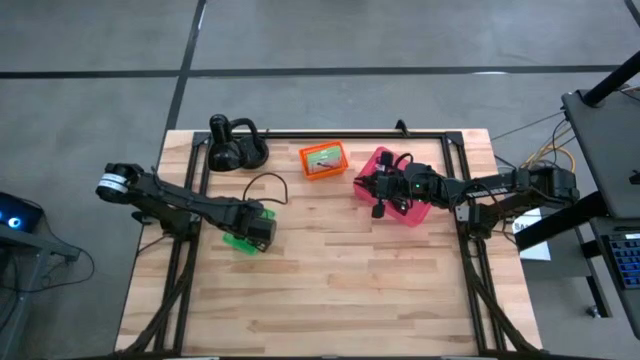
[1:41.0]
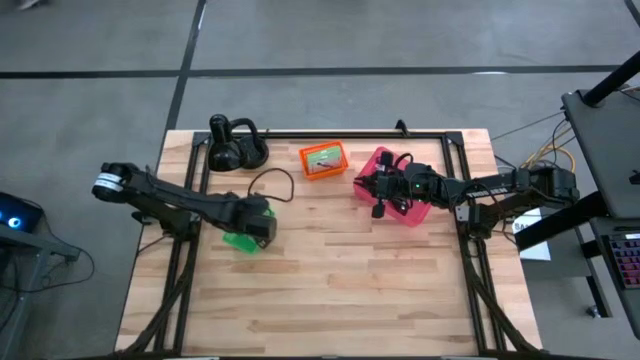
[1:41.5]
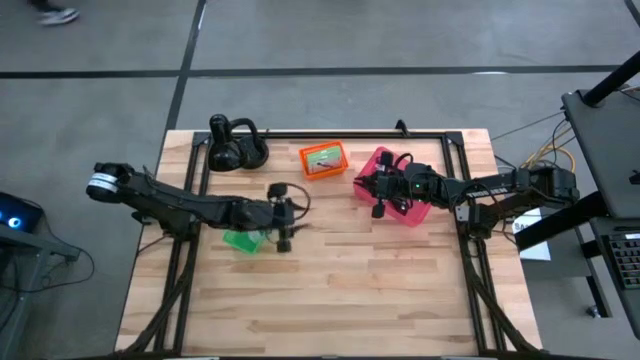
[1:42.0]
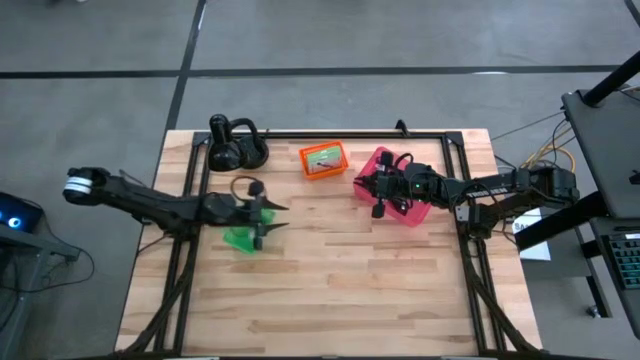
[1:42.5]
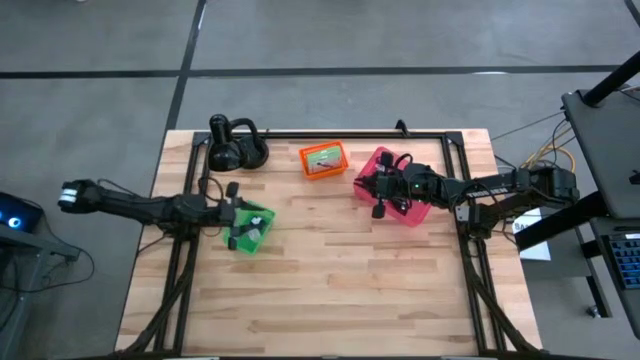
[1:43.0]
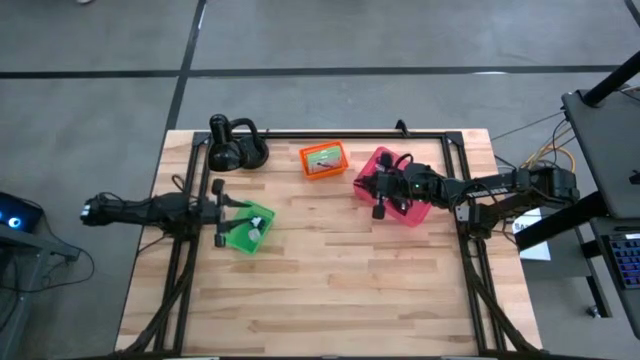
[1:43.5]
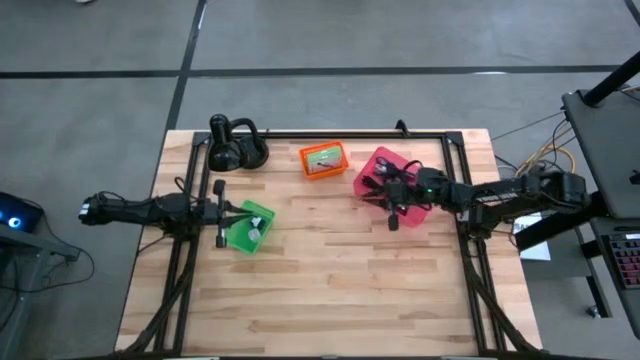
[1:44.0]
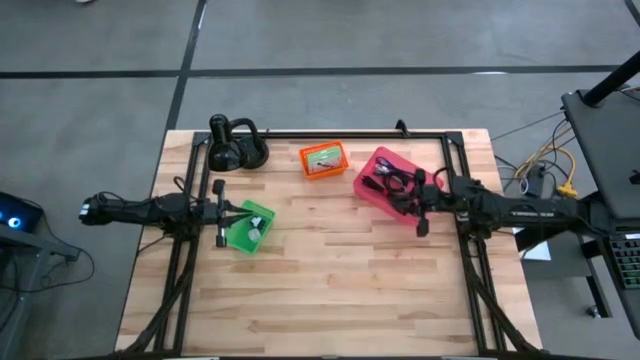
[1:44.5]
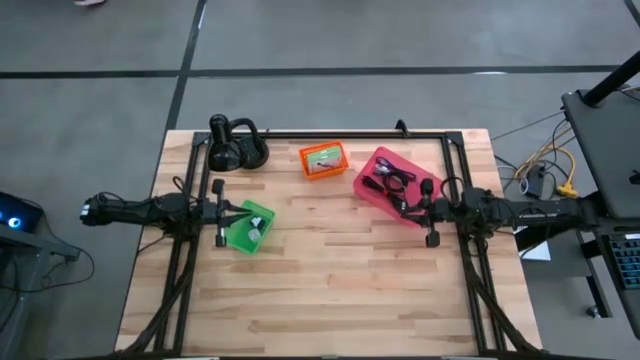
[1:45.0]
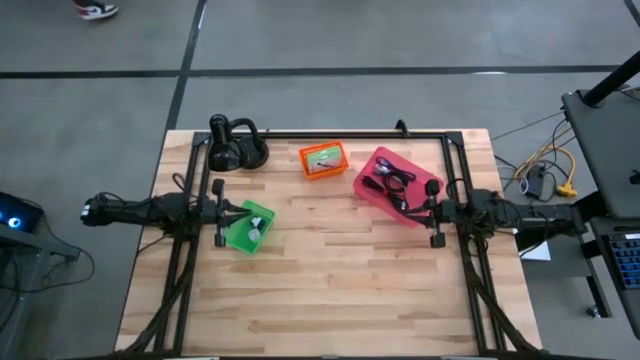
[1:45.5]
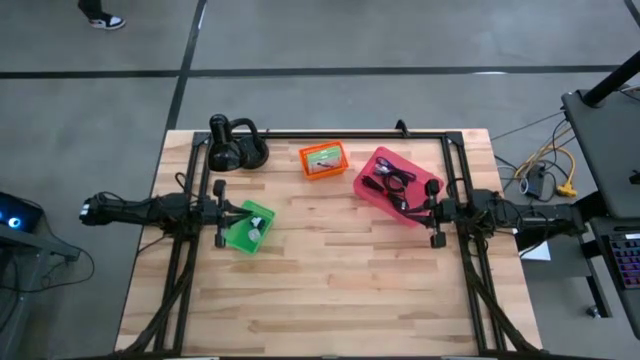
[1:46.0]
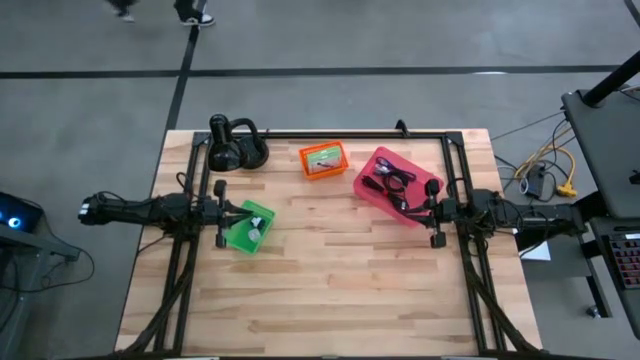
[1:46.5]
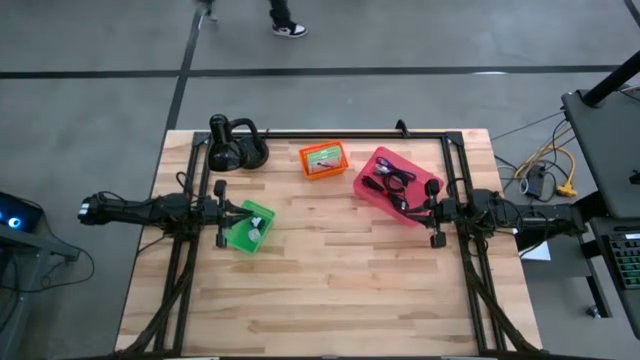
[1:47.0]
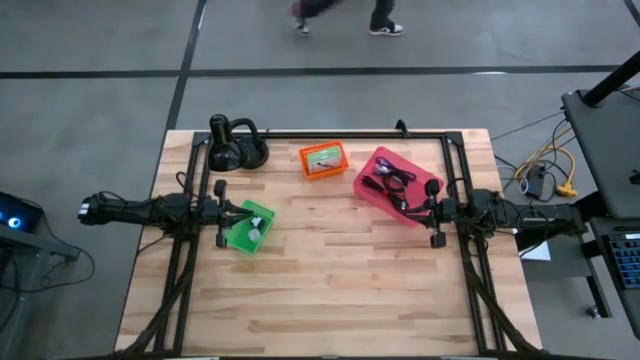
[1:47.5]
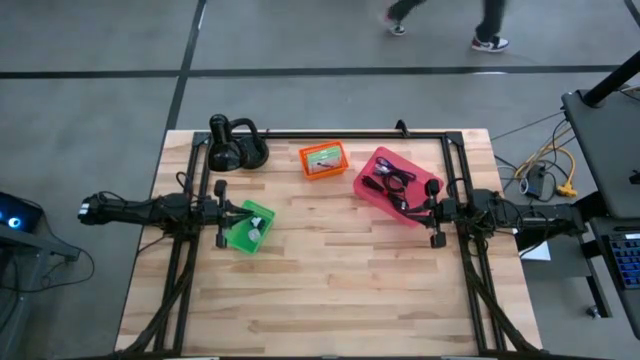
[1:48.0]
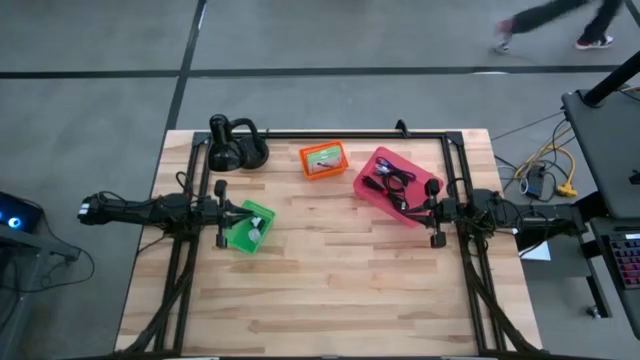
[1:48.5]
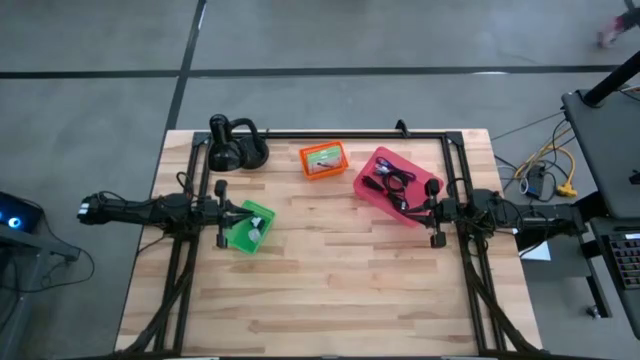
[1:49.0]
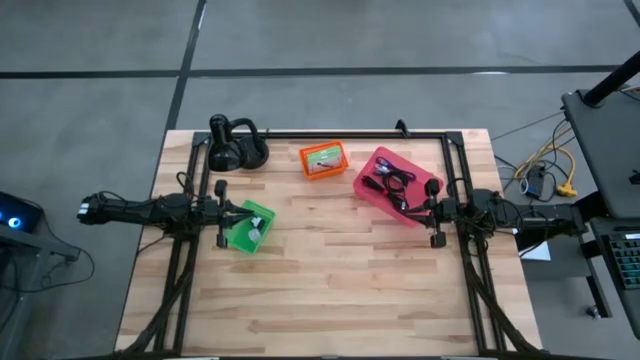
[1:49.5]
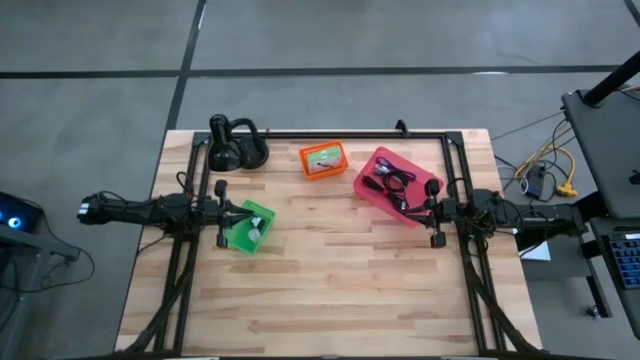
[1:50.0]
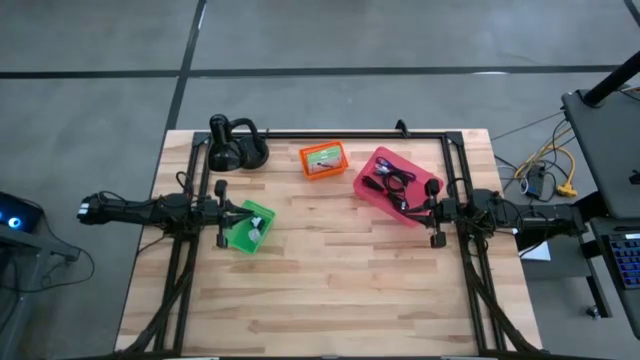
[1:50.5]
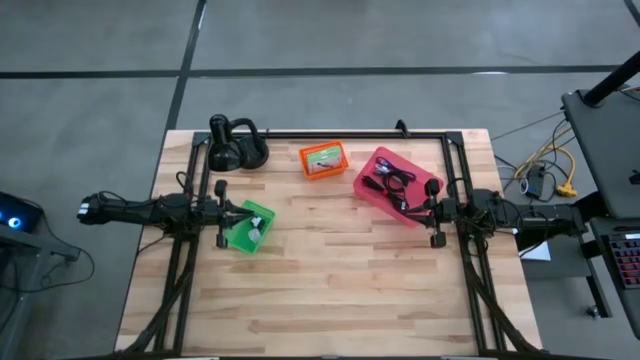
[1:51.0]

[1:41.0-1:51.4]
Task: Pick and place items into bin
Return to Home Position

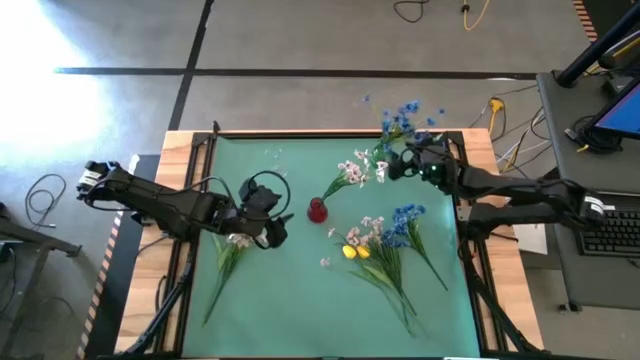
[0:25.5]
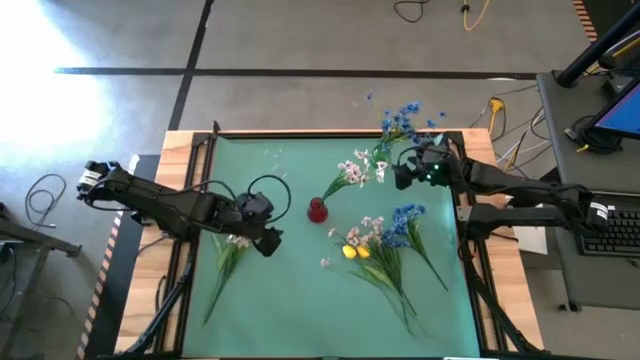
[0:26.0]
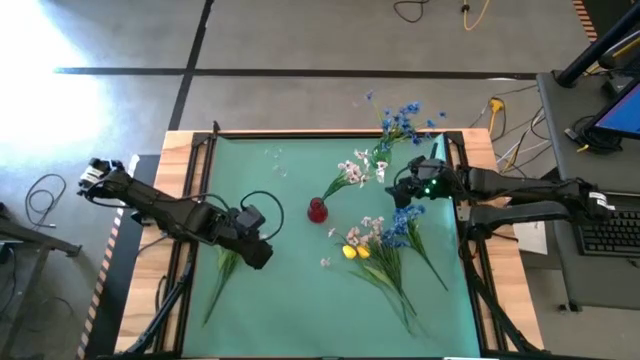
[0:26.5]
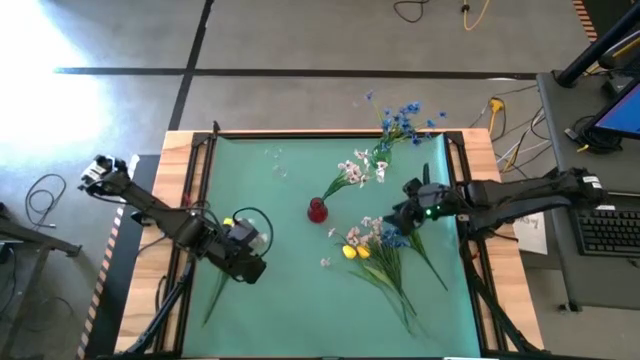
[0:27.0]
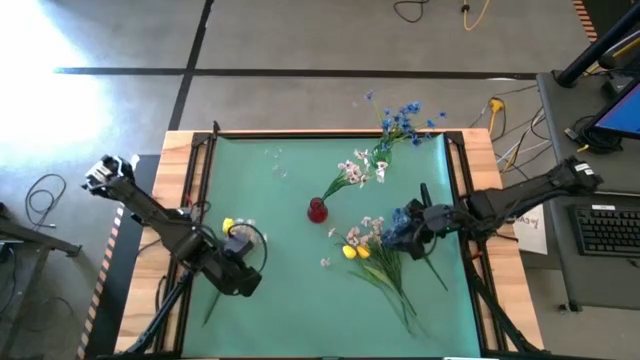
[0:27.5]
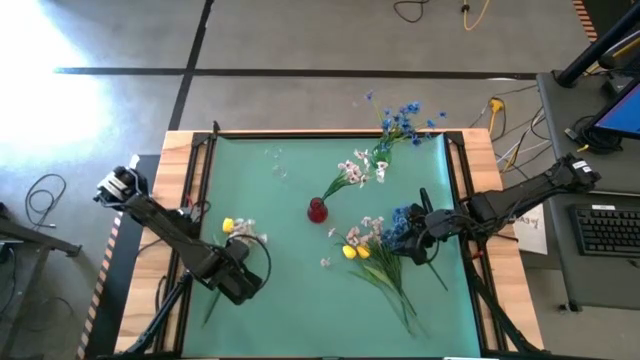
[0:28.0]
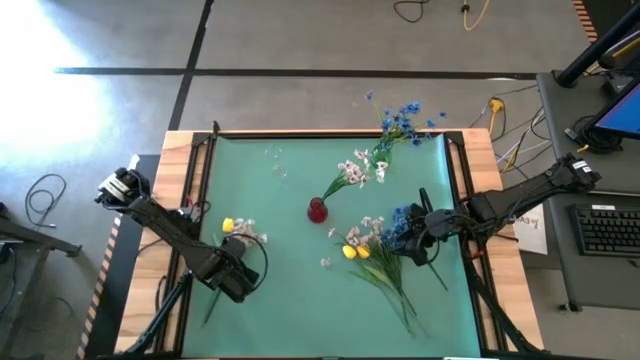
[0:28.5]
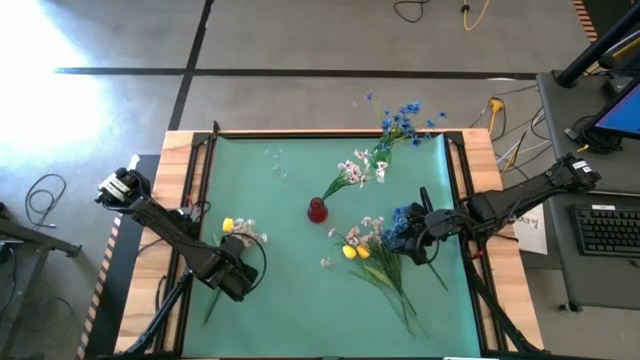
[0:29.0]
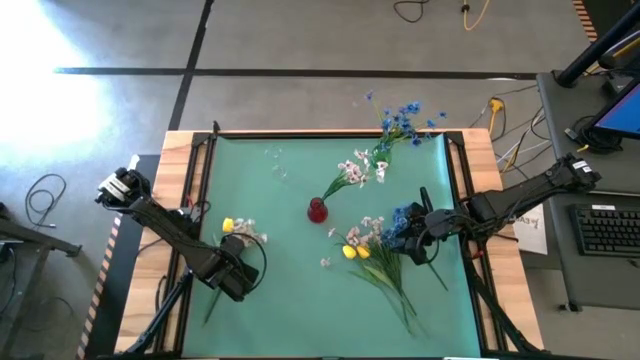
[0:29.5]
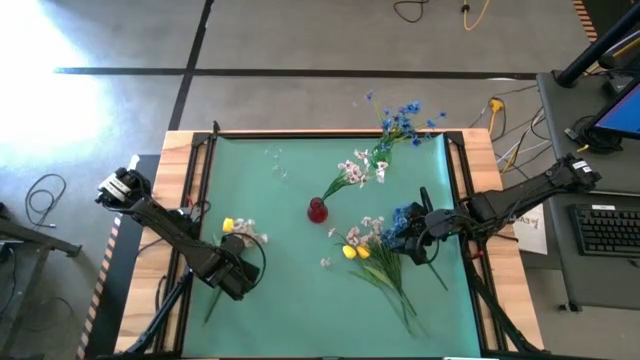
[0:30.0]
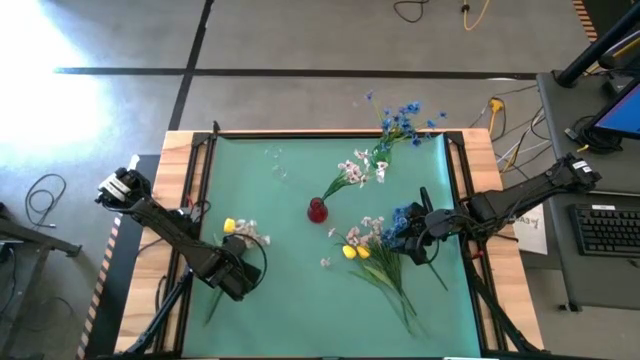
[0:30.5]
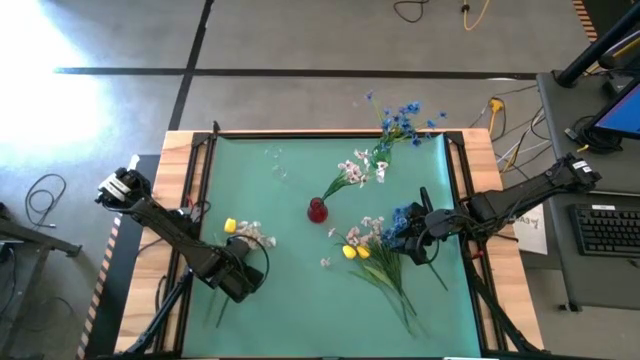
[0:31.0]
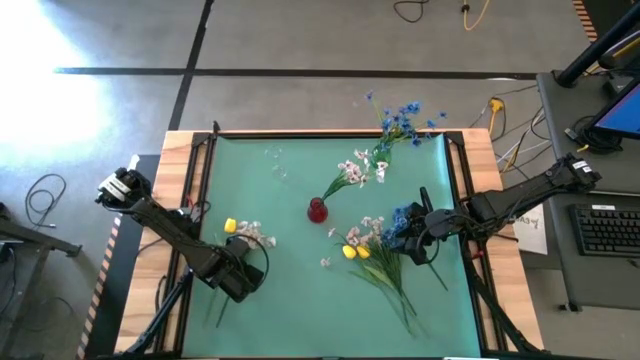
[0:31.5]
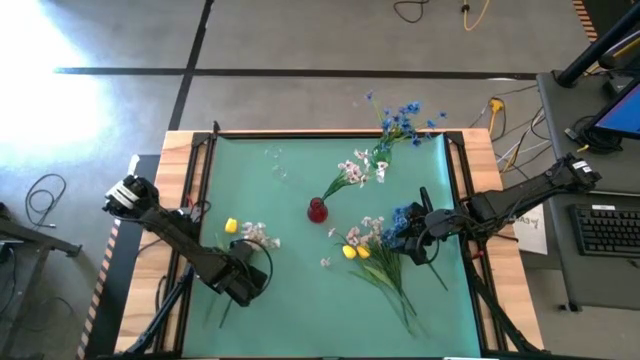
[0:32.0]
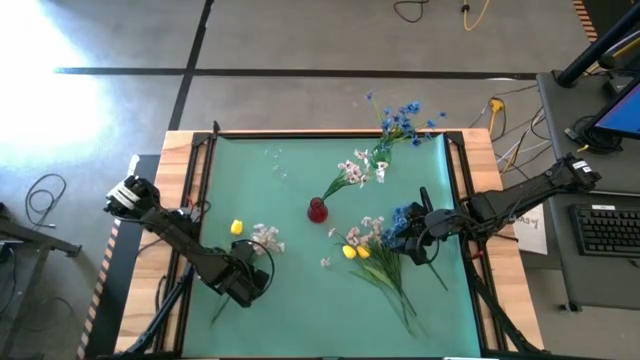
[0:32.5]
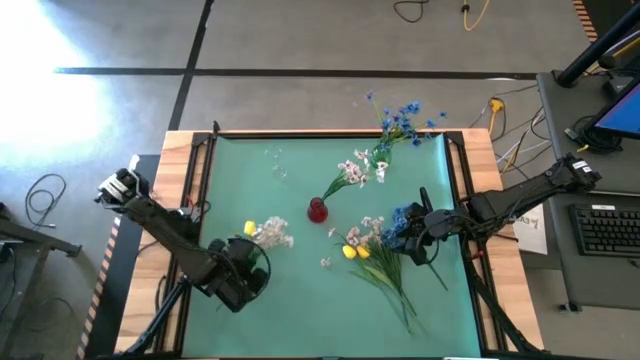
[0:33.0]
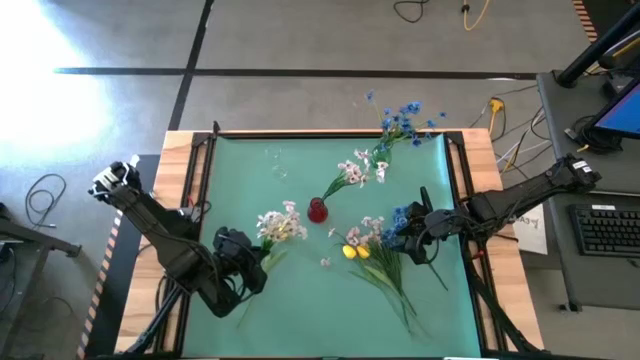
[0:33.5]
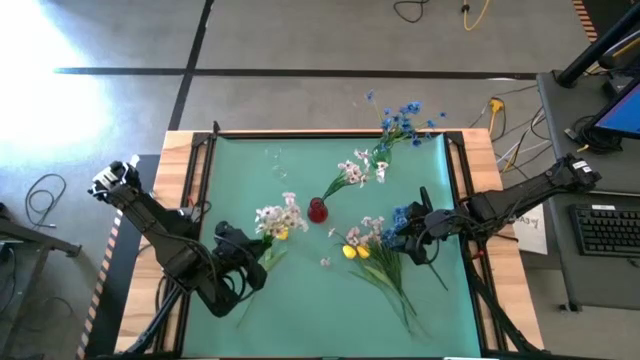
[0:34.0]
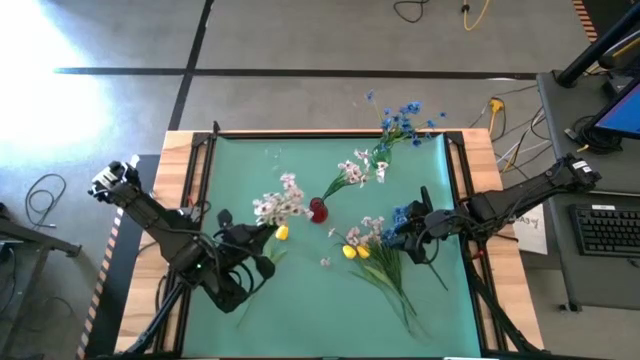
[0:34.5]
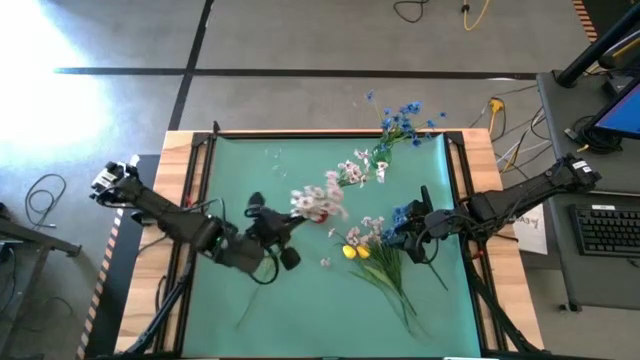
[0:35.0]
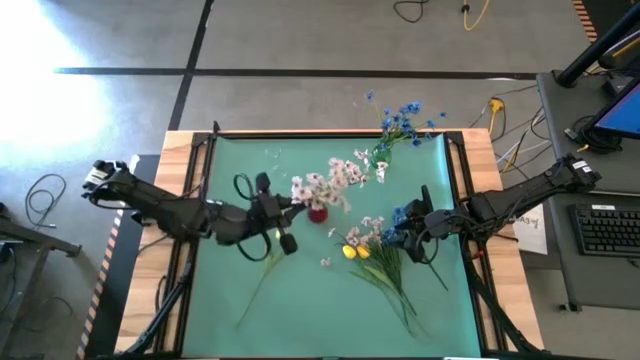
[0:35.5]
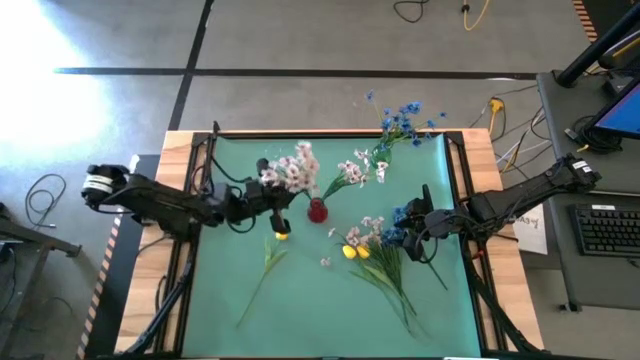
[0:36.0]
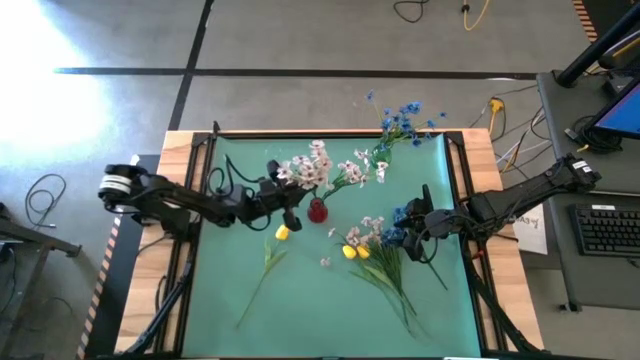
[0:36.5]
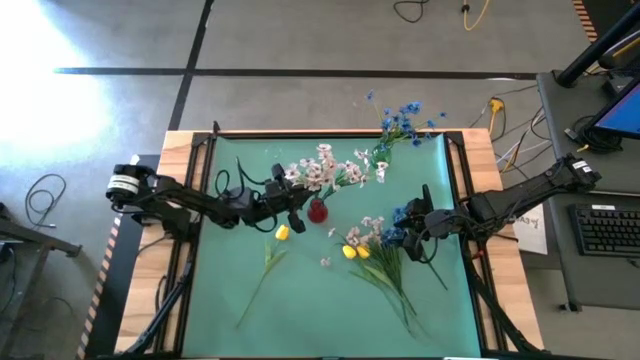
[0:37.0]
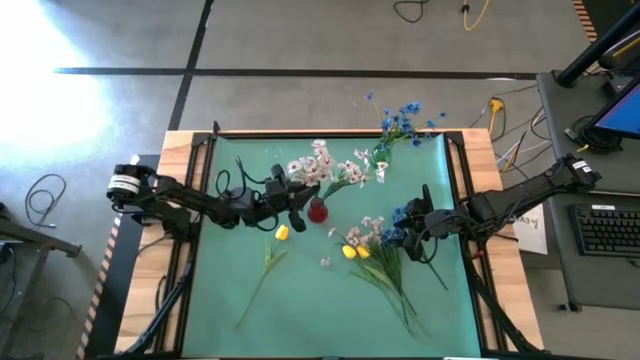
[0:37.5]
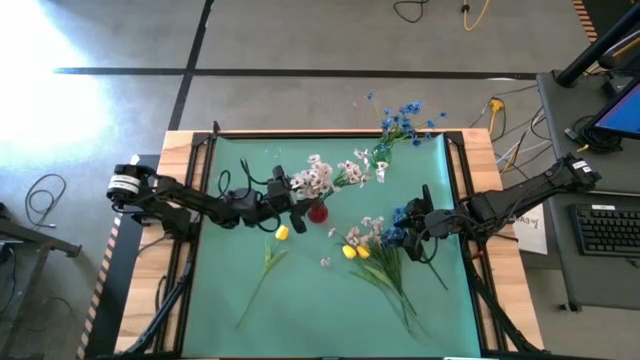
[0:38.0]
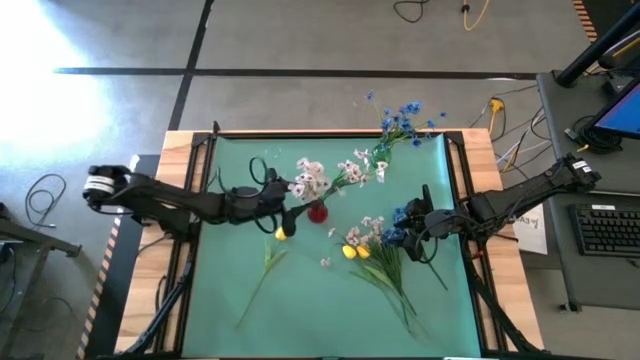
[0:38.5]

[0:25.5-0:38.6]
Task: Sort flowers into vase by color
Put the white flowers into the red vase
